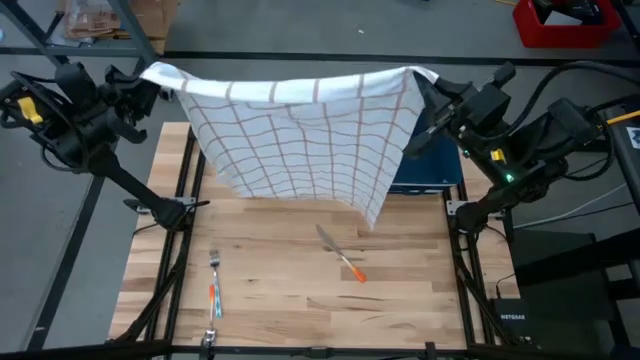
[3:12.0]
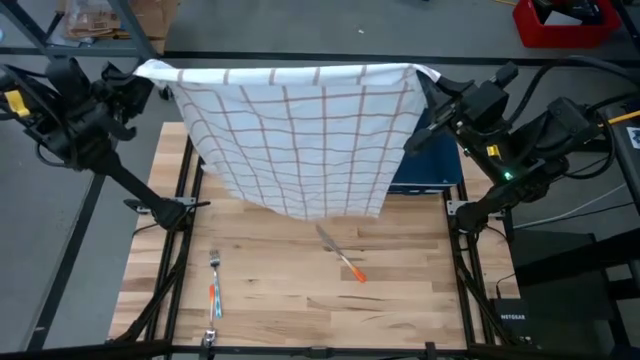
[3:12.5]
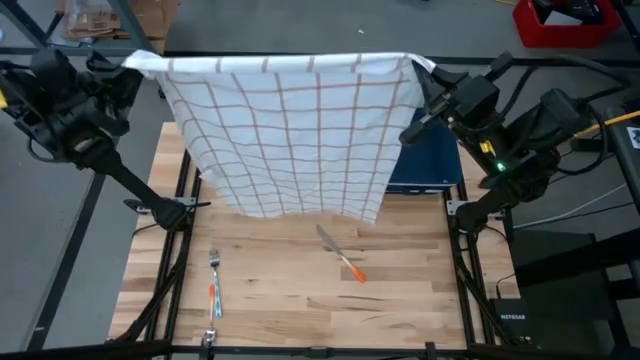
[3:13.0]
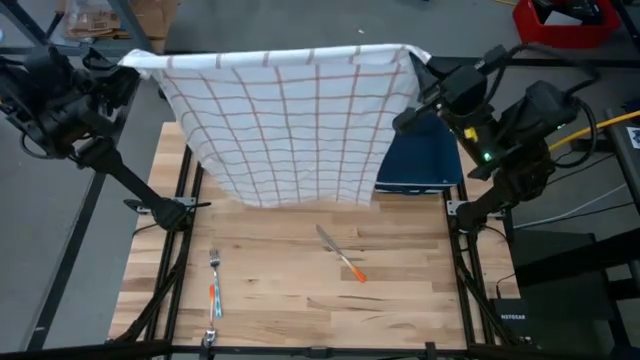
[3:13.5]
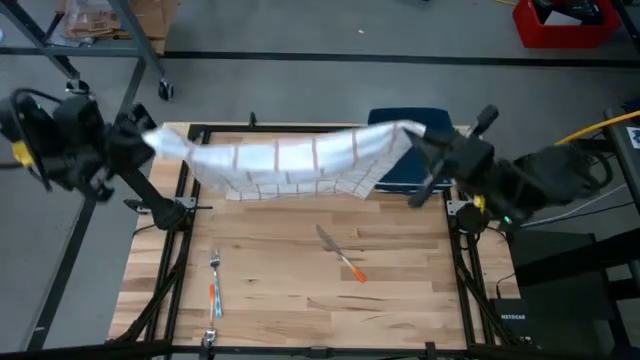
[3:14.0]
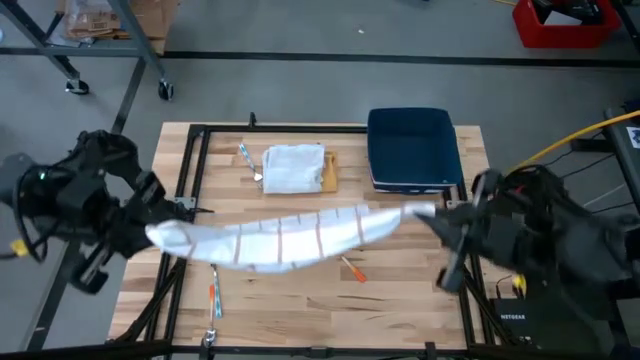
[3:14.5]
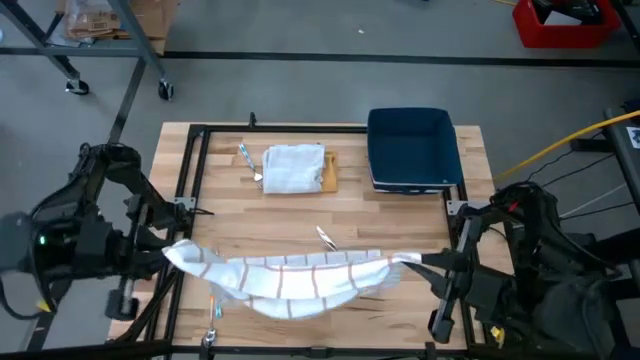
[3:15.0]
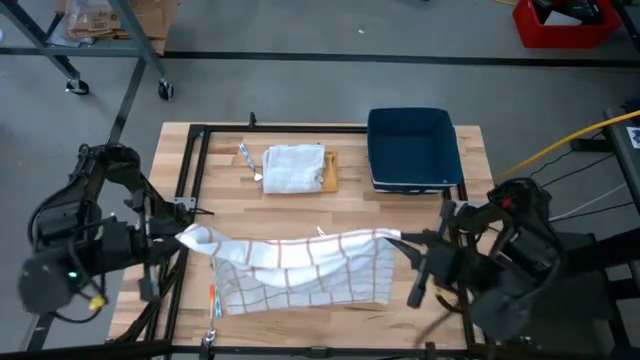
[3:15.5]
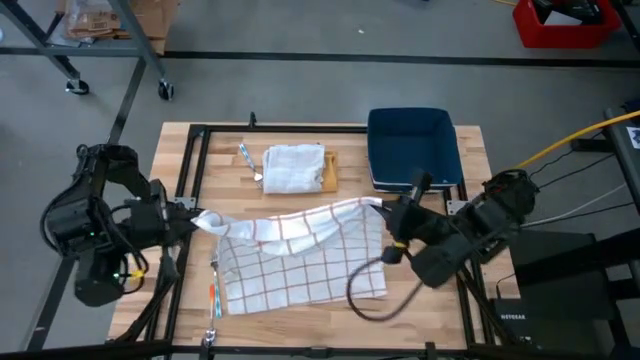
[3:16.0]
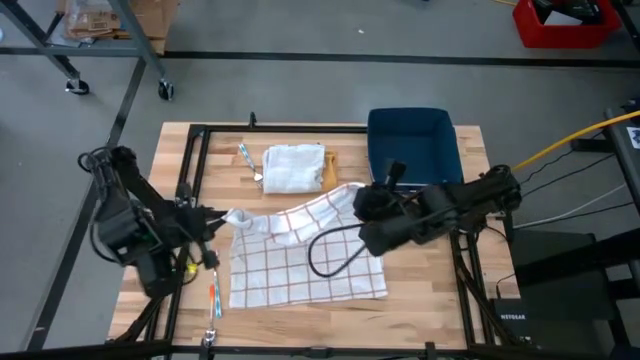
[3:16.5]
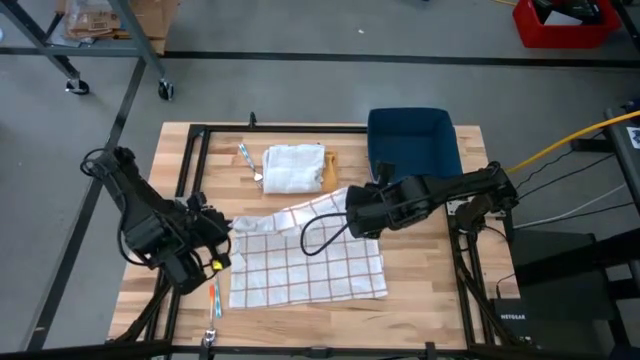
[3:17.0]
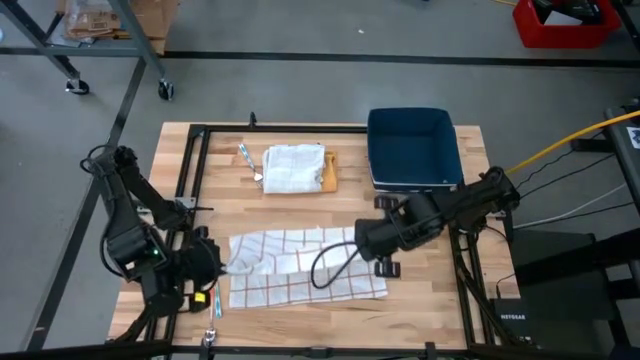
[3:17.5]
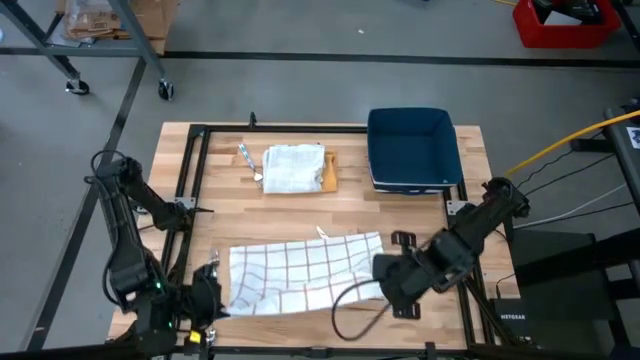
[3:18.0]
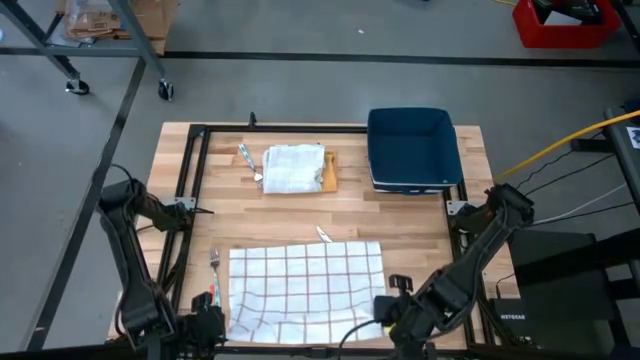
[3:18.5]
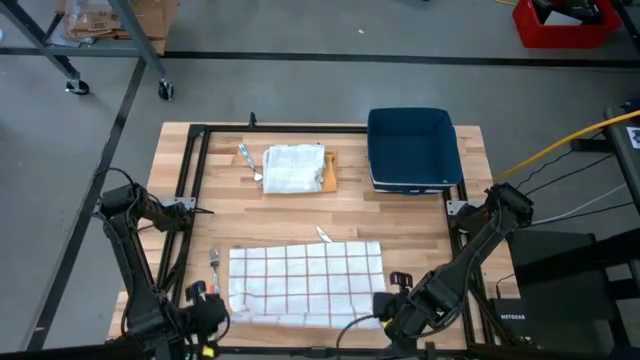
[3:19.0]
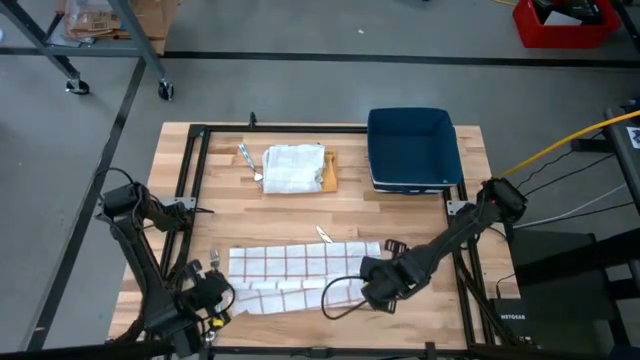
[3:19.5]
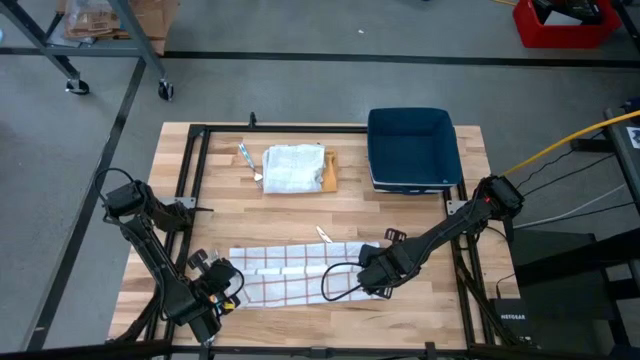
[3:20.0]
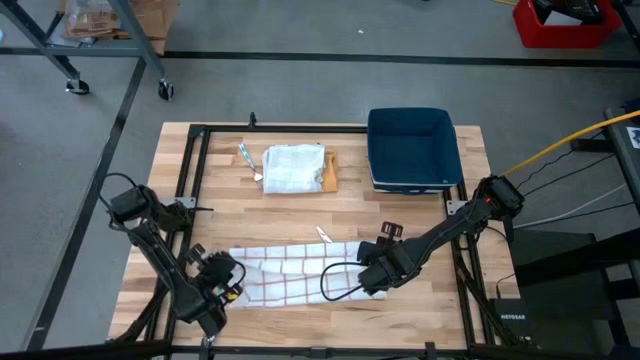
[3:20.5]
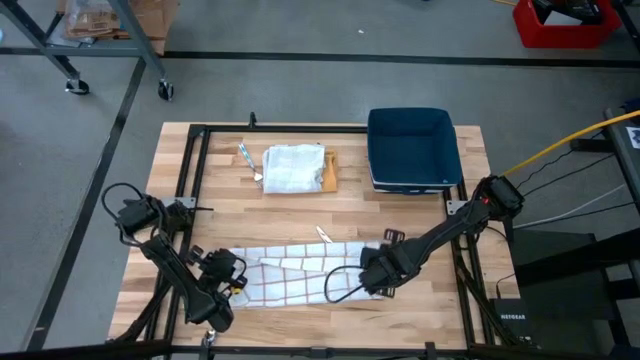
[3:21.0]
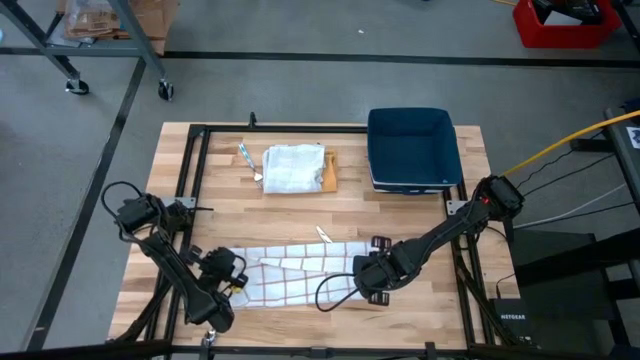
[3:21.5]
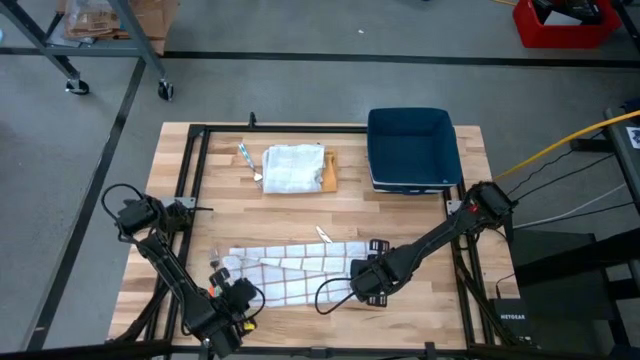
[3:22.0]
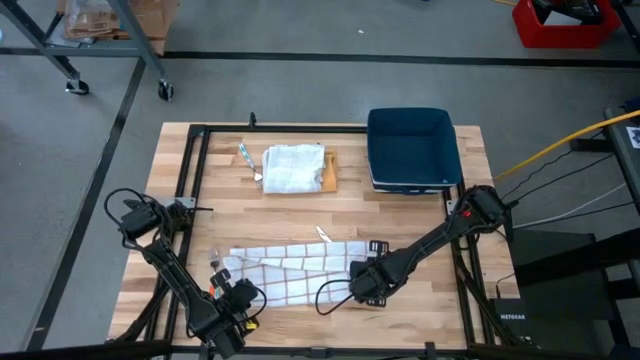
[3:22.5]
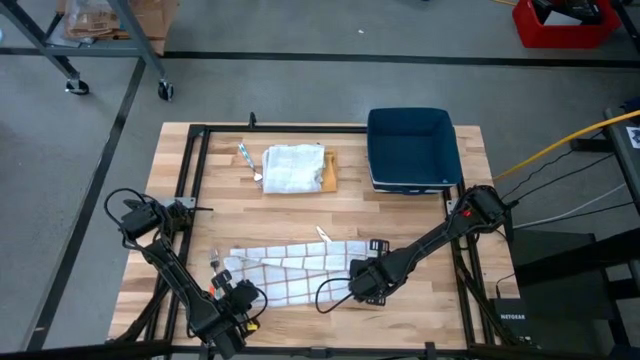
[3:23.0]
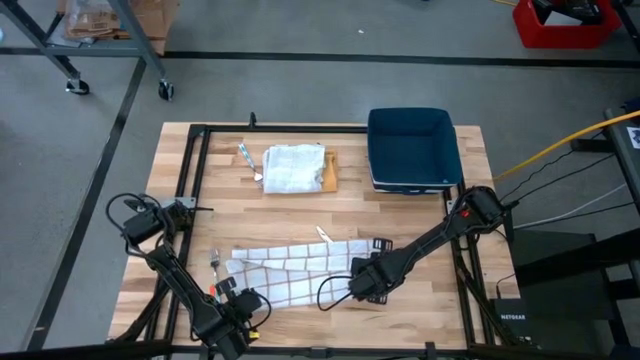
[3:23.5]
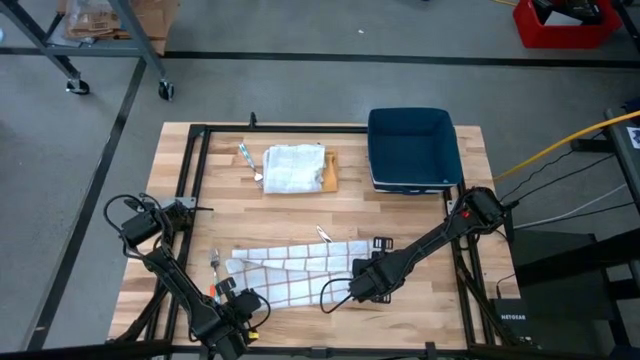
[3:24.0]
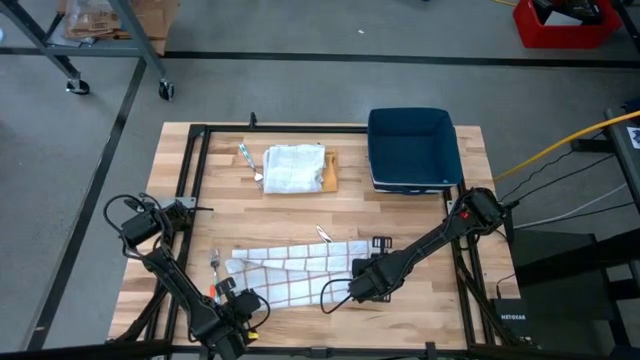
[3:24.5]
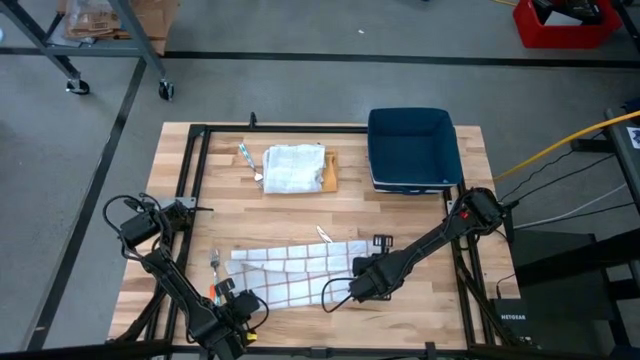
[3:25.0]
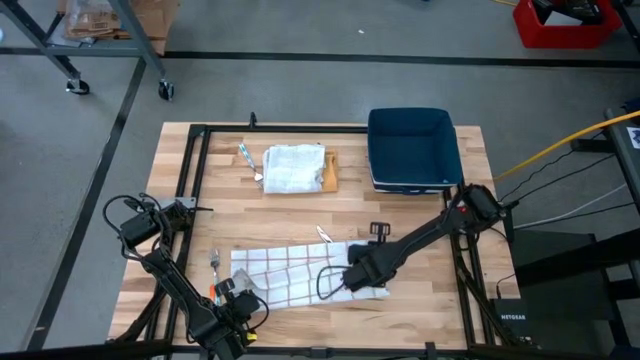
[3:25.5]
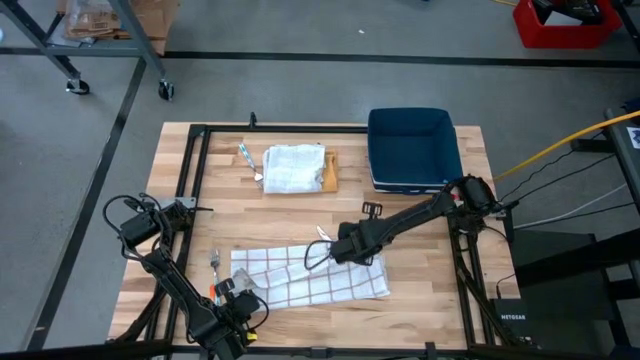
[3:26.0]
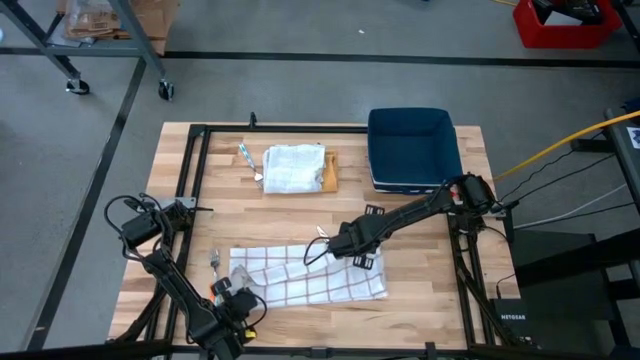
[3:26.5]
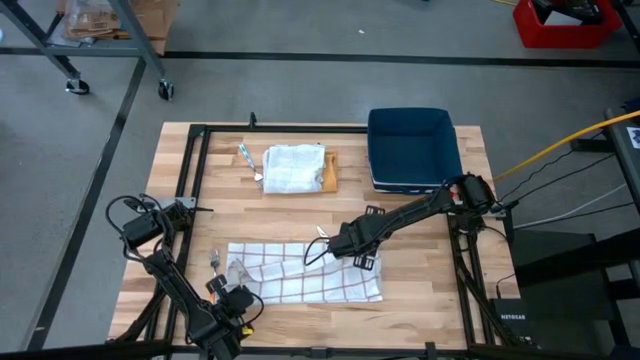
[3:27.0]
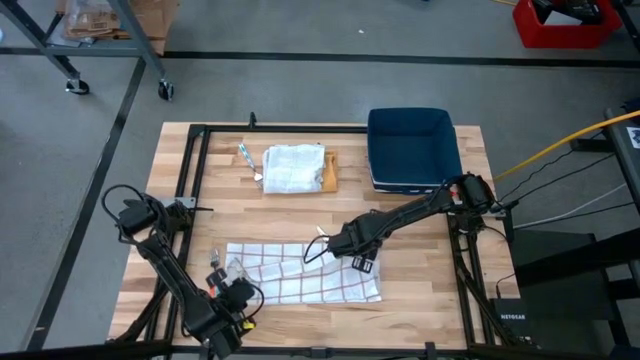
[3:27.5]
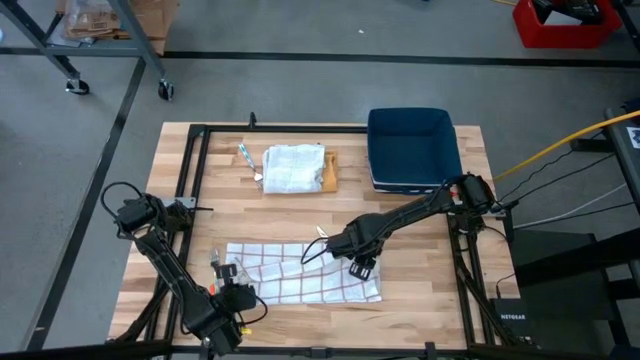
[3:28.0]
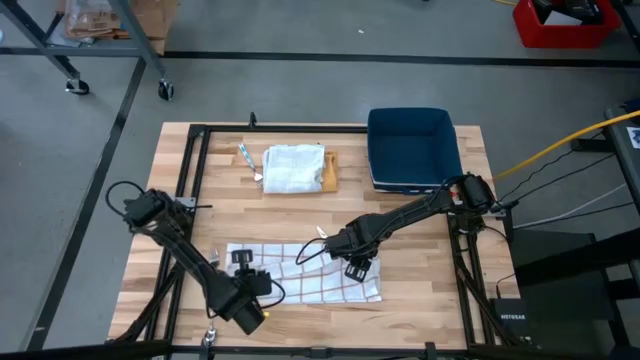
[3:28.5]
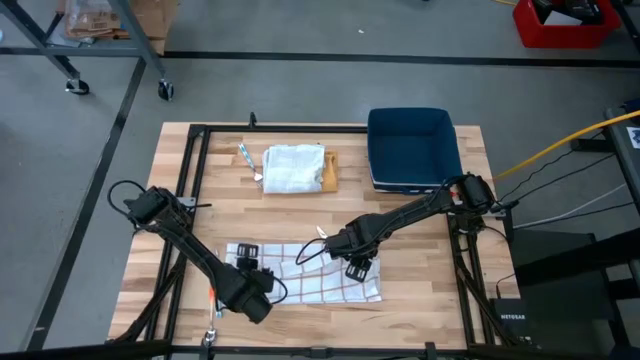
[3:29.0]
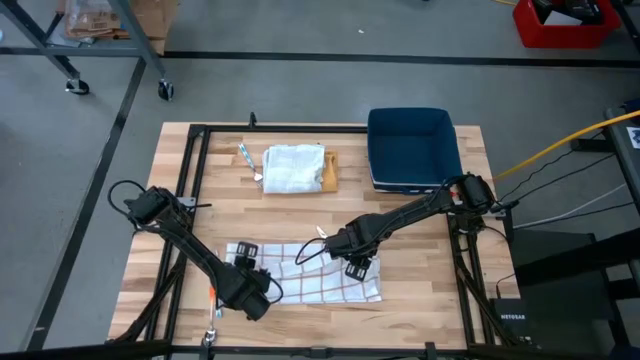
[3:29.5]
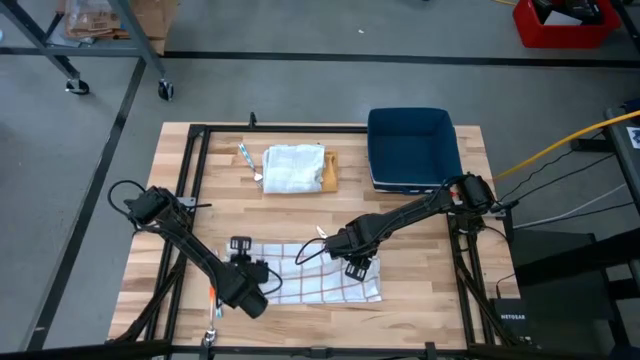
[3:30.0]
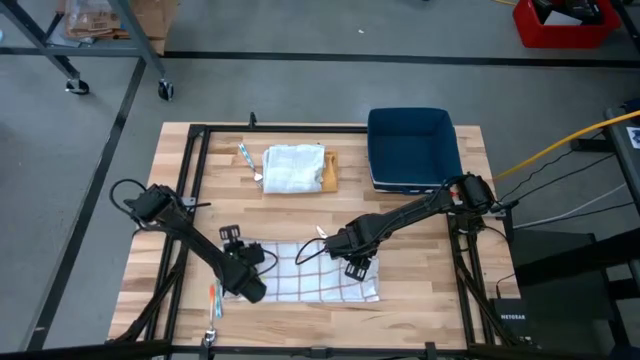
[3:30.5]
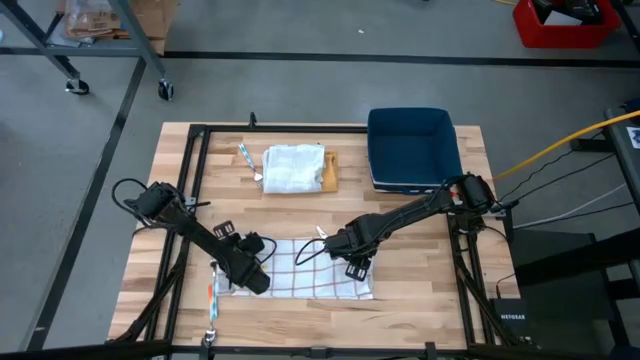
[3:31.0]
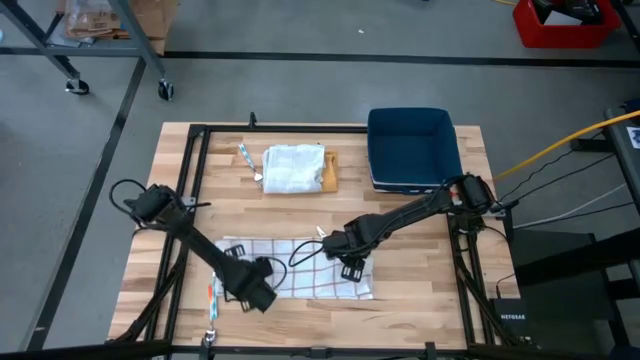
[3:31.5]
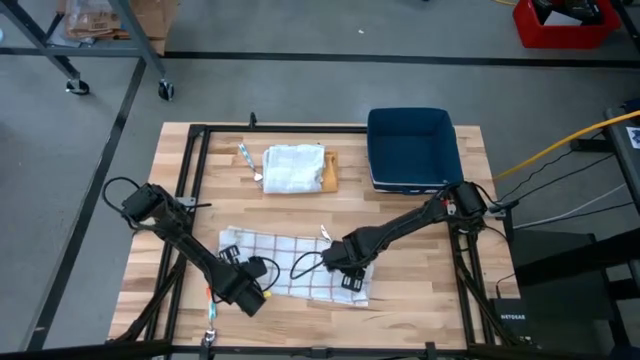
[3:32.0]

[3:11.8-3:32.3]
Task: Fold towel
Fold the white patterned towel
